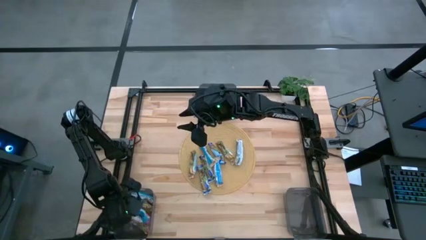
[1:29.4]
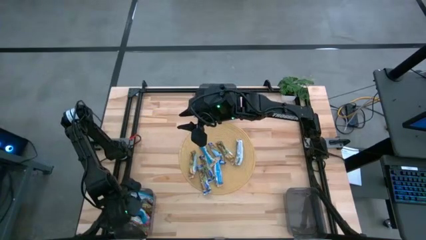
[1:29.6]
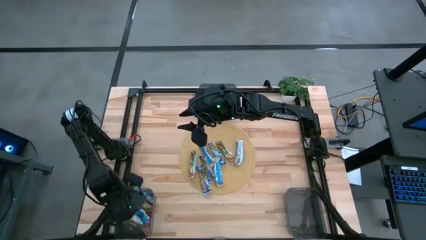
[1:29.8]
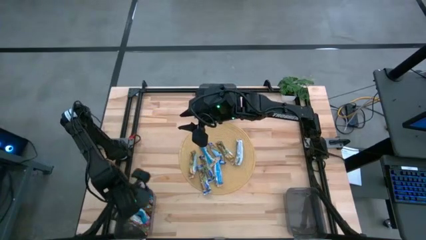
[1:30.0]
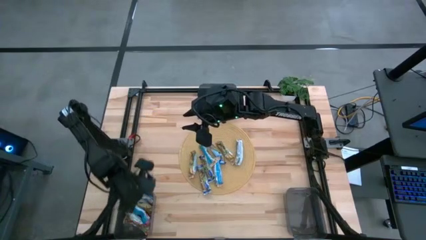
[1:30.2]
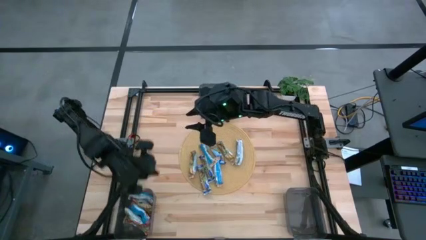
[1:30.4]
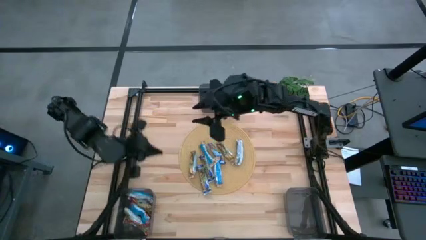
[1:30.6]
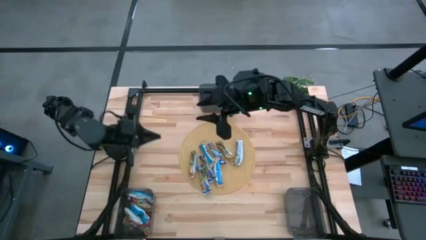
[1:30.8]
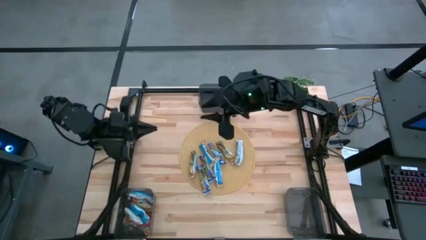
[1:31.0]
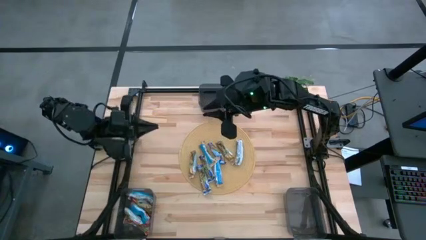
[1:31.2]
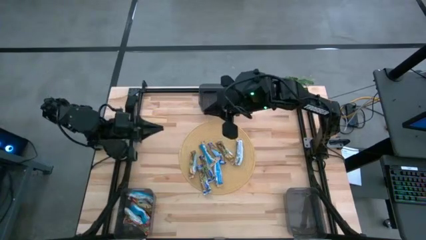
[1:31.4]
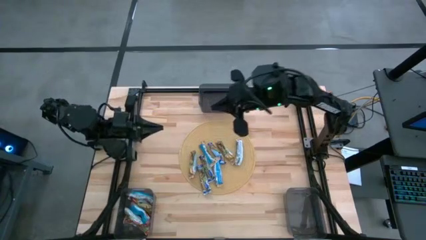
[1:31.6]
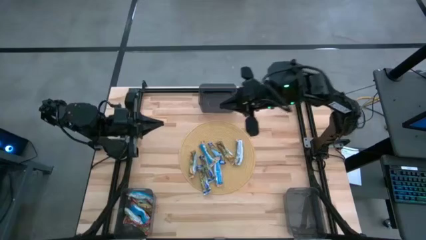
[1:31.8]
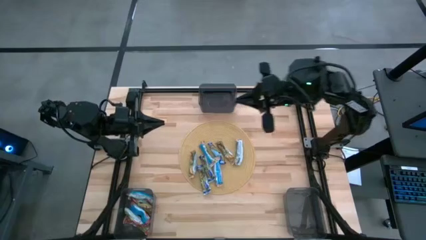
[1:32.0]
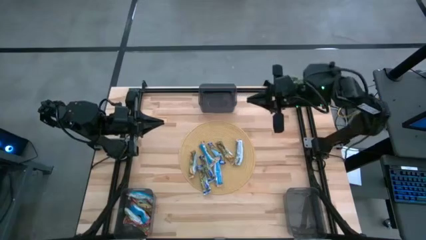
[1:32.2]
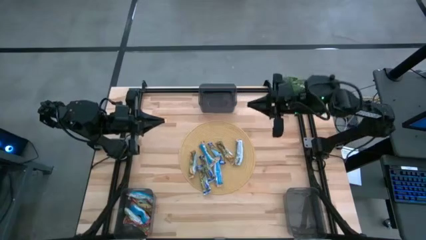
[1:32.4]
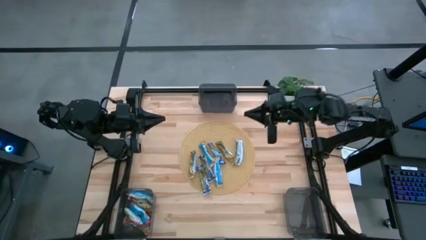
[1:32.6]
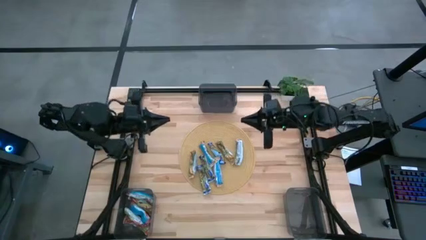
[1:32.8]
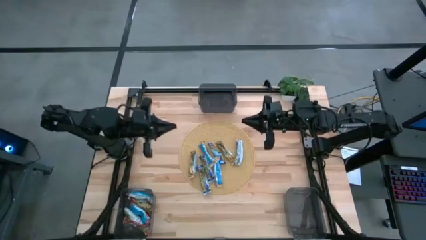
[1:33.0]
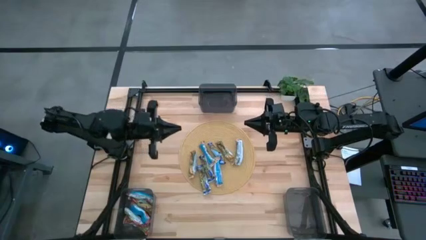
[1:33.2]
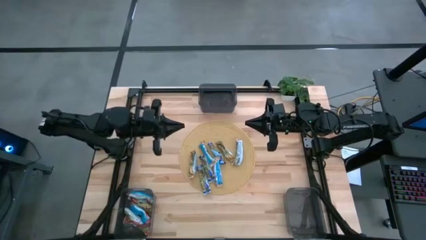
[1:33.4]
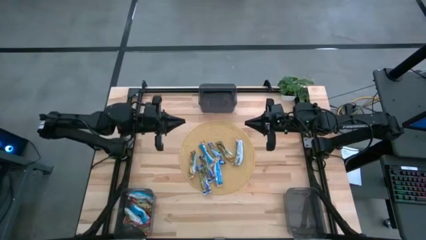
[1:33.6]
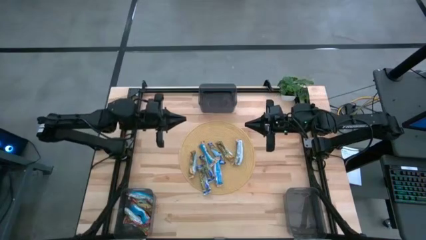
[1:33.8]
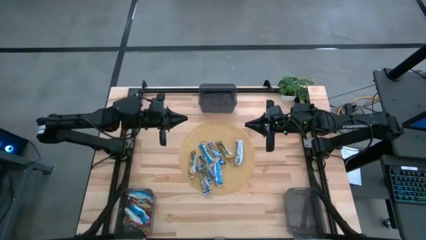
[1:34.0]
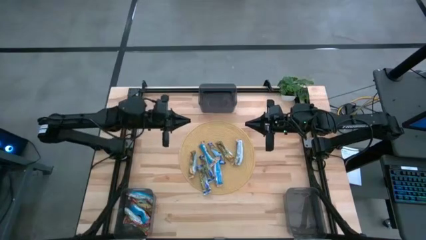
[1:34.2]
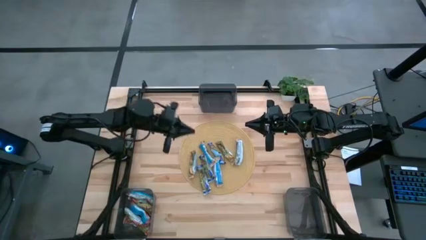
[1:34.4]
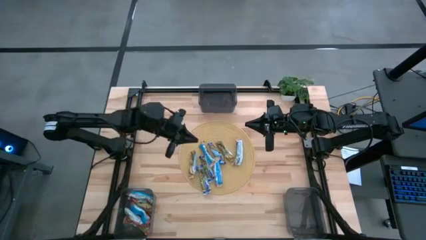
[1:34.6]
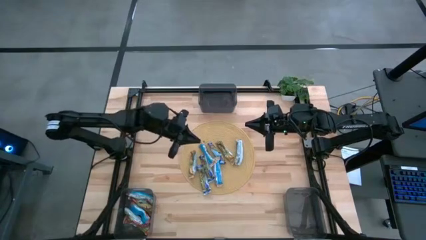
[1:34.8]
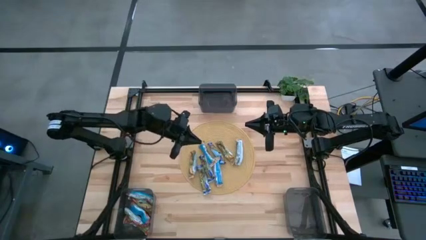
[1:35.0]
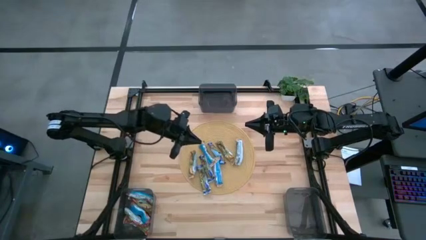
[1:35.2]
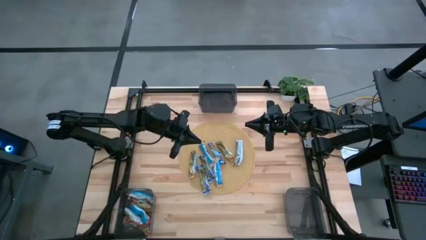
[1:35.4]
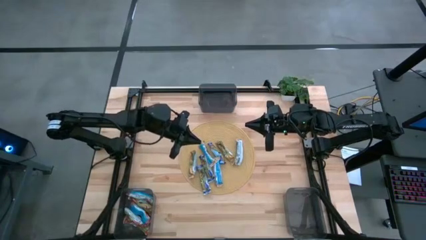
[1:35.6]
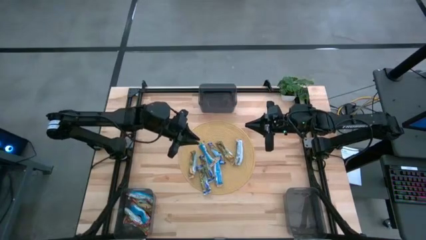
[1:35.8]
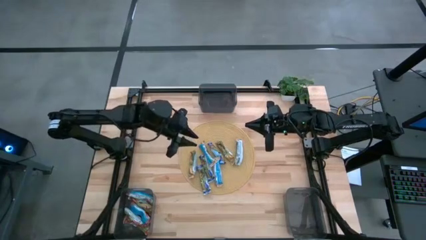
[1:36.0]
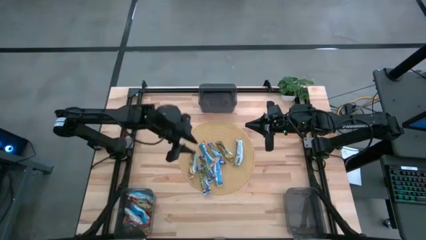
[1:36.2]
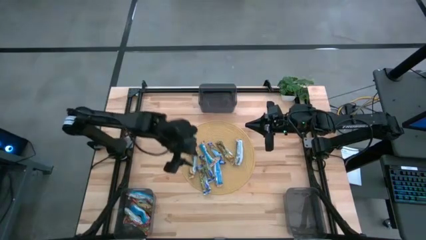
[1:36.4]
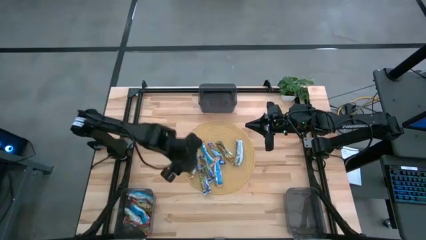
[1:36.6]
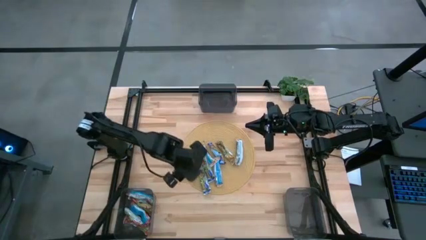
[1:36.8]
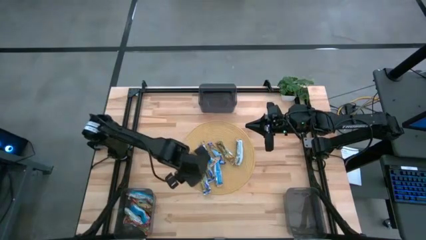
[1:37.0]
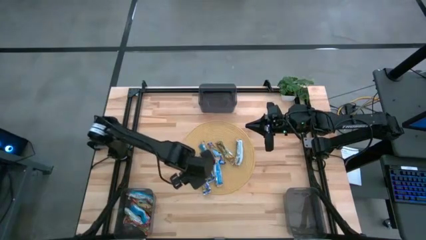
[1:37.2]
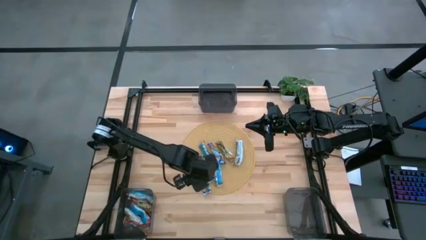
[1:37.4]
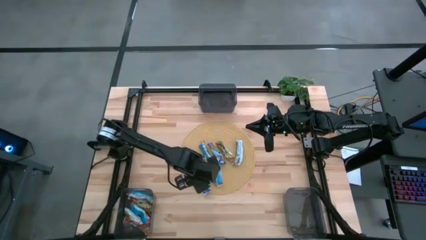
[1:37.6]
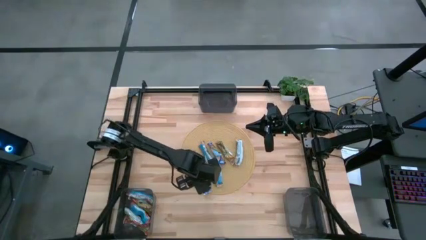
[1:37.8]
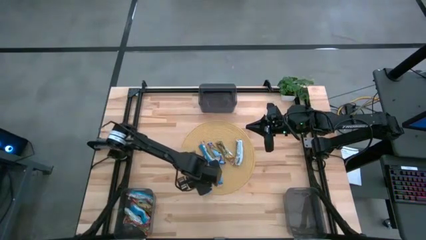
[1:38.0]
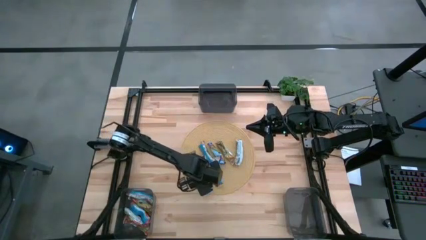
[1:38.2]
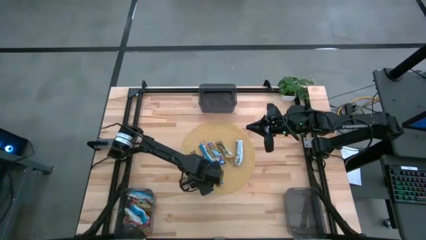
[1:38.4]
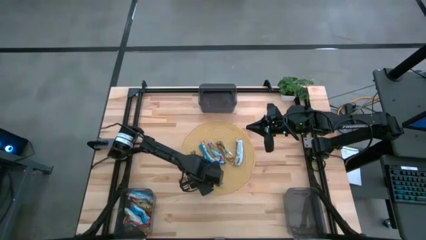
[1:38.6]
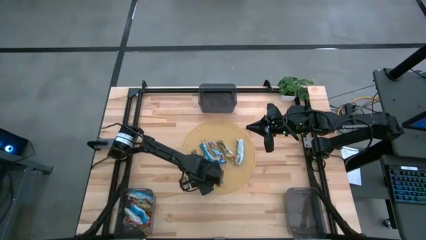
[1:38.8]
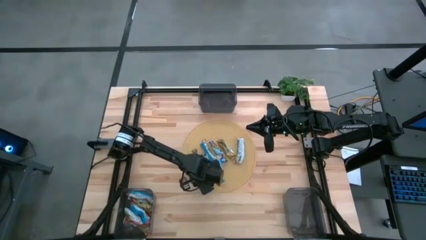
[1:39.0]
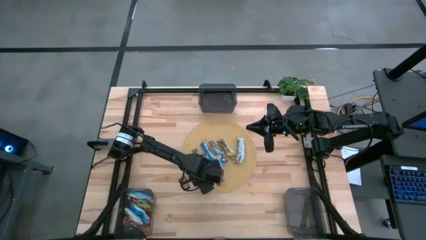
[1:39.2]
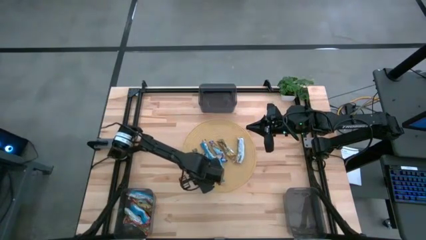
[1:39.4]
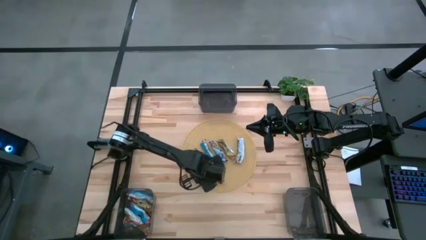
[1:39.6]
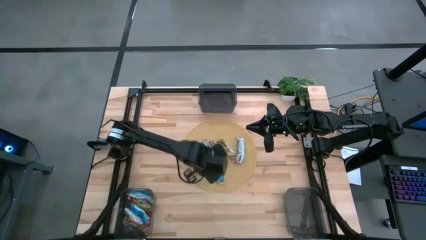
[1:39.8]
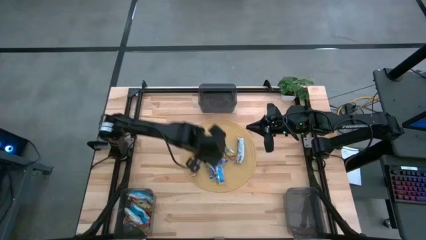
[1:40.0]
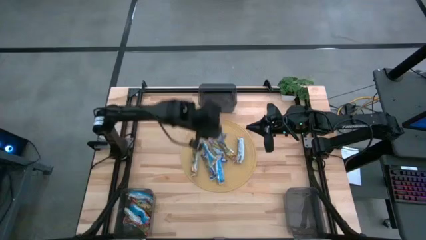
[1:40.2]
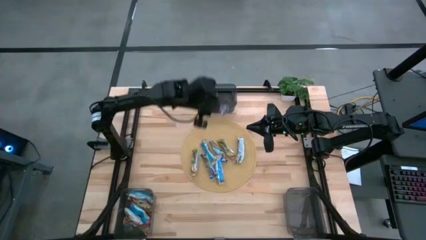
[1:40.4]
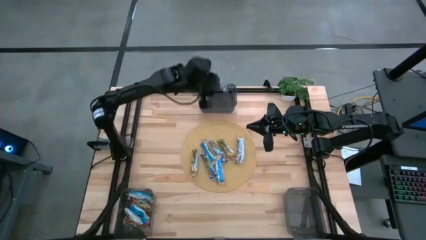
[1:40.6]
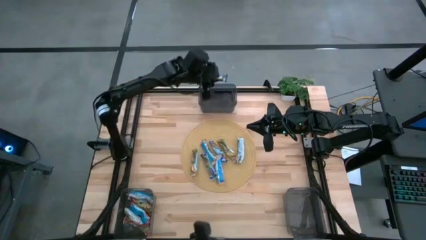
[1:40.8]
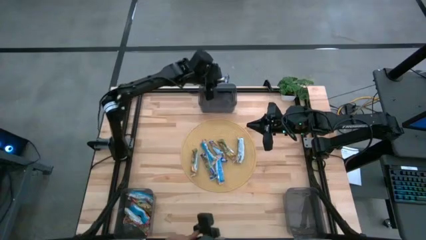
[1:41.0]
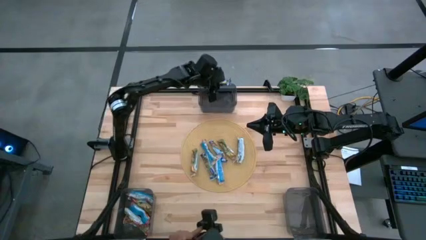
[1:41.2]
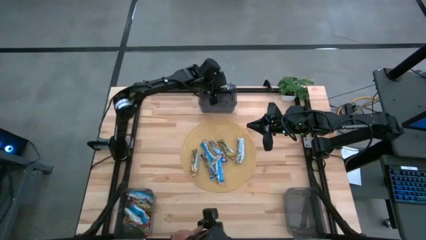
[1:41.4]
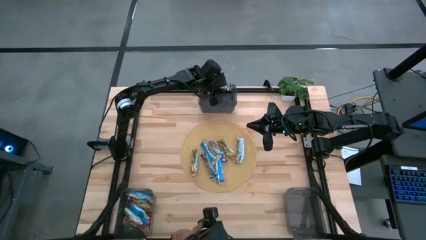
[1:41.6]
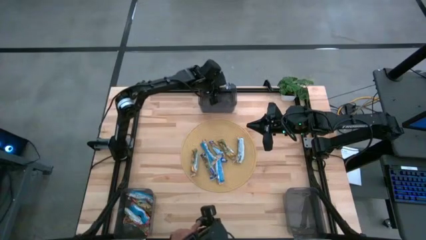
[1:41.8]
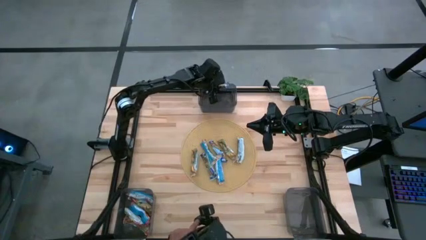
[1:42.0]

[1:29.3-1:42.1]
Task: Pick and place Granola Bars by type
Put the blue granola bar into the top black bin

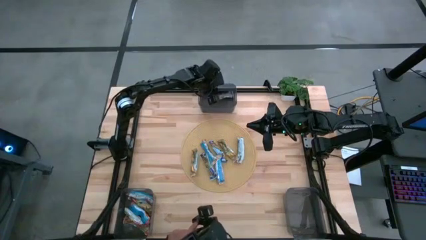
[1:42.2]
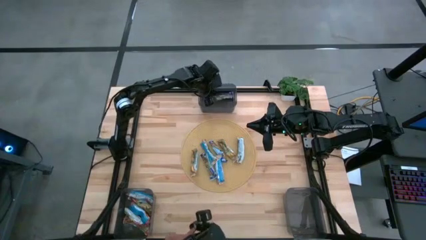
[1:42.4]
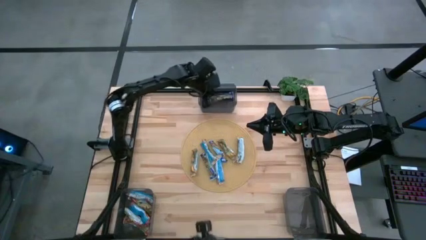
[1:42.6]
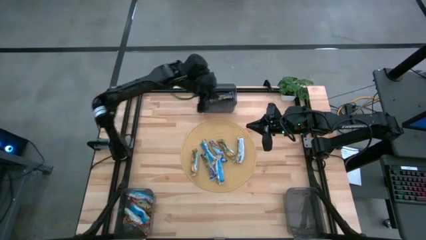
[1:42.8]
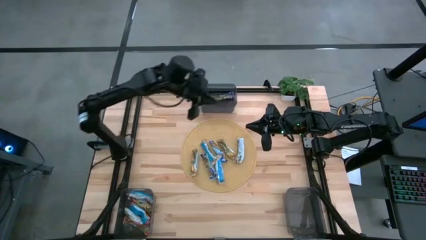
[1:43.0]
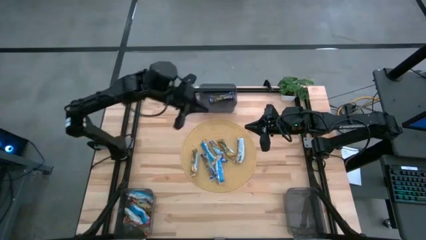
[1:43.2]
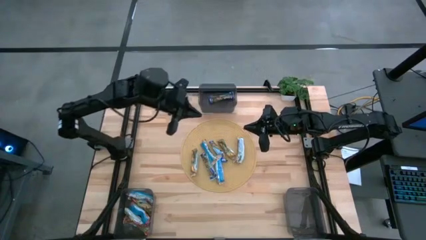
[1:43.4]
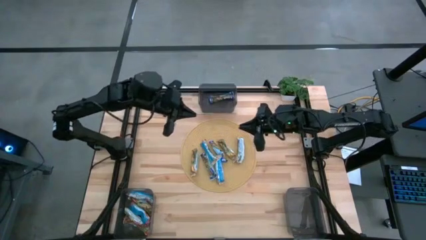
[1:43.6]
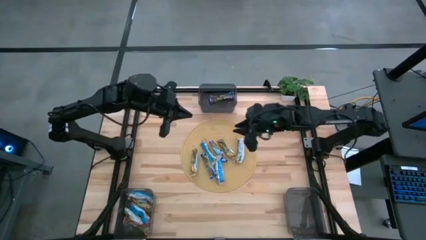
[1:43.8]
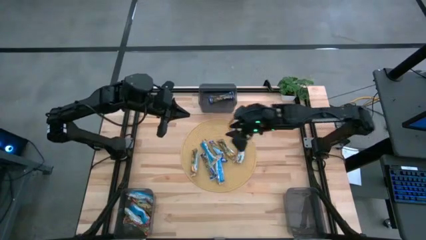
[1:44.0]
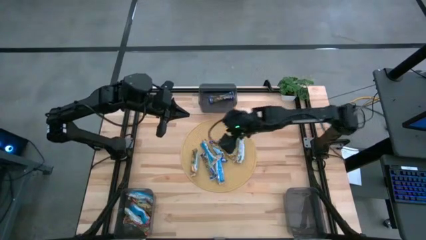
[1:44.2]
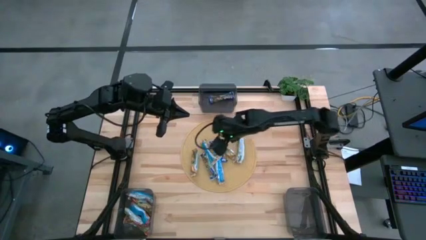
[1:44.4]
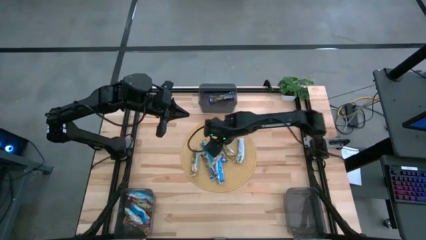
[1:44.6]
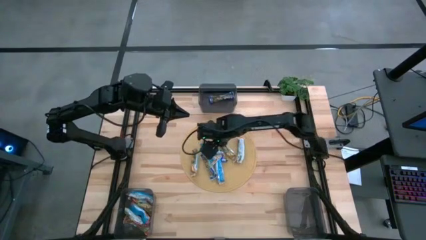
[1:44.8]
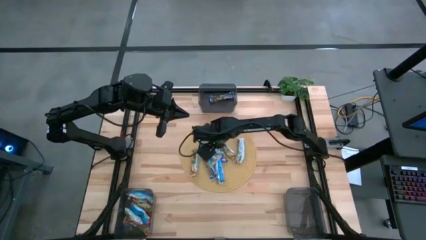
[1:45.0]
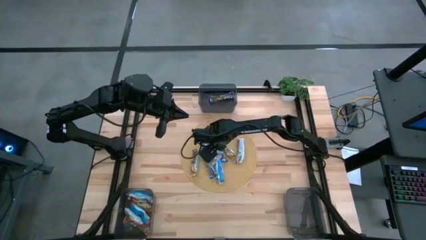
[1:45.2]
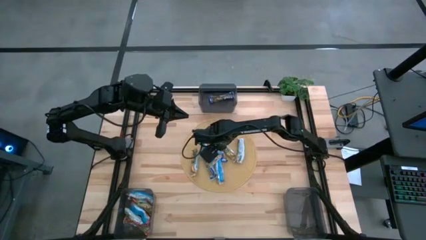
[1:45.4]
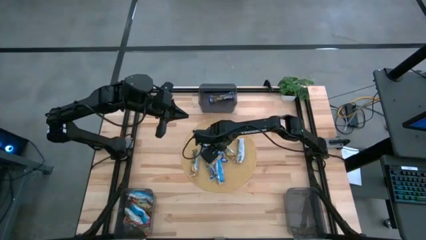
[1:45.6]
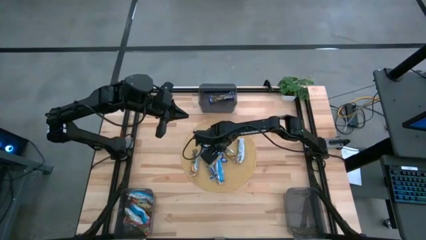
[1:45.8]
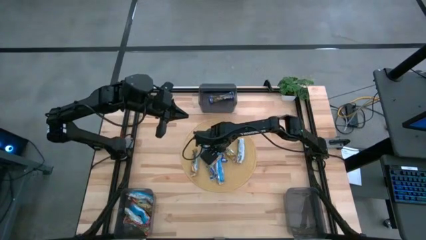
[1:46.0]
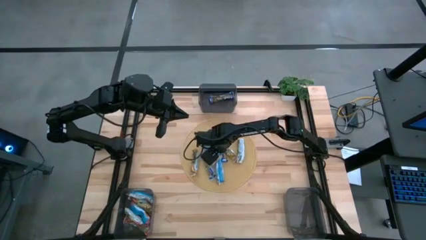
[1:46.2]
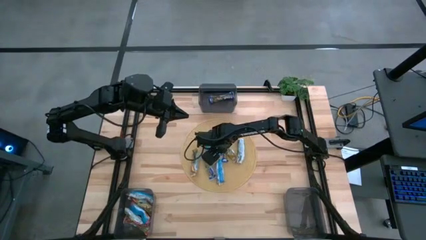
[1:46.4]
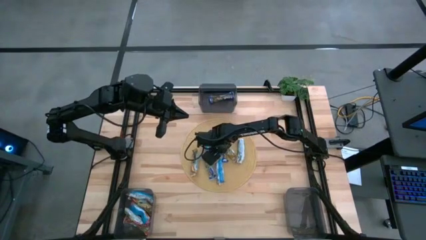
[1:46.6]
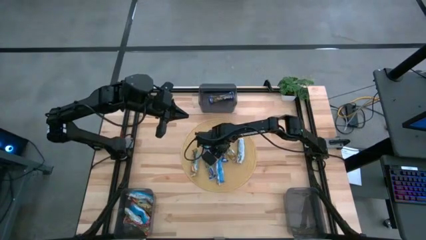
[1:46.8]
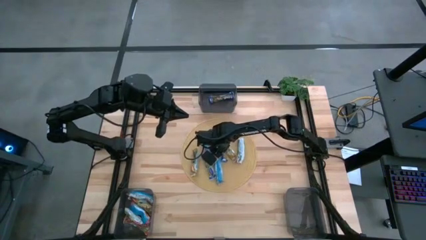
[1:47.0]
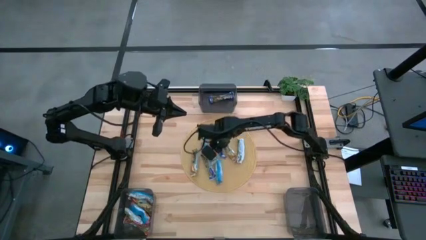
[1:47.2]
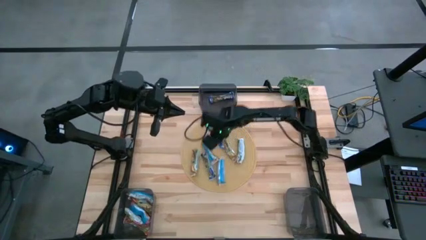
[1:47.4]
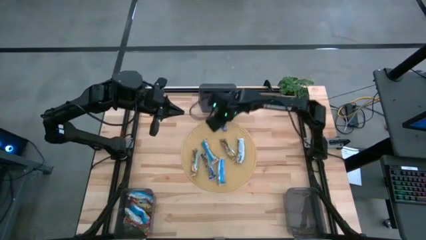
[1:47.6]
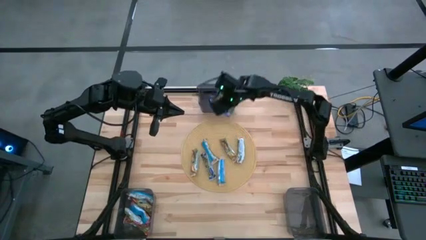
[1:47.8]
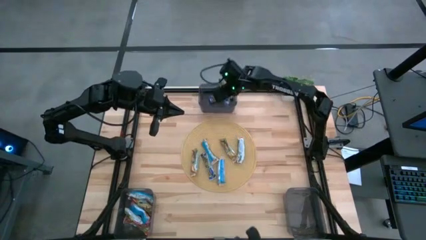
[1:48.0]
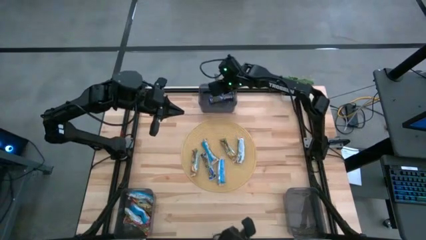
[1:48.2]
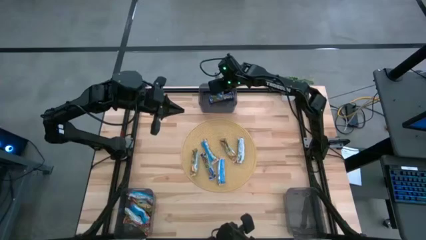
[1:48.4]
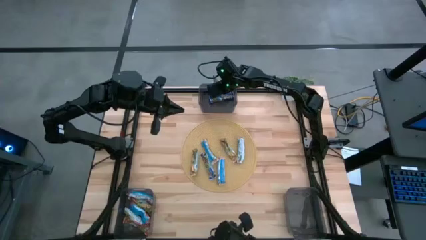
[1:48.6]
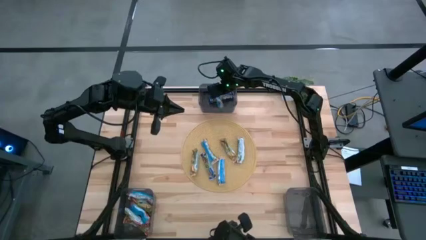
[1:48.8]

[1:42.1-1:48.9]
Put the blue granola bar into the top black bin
